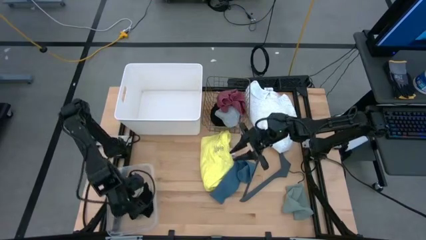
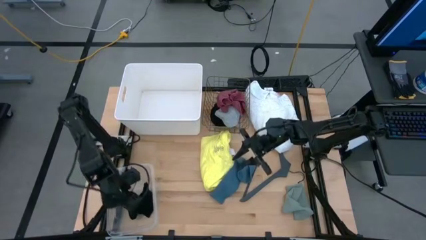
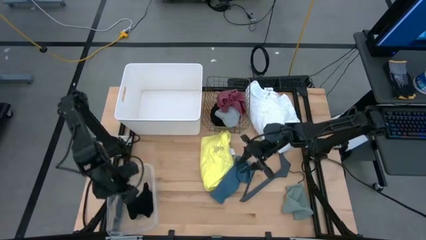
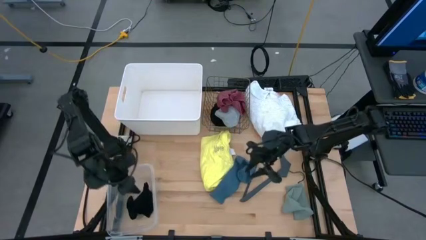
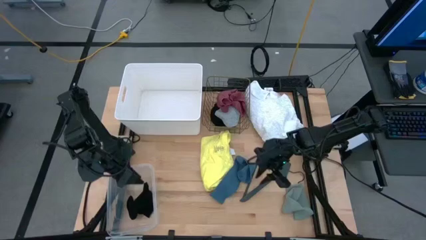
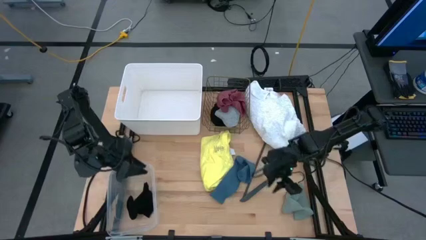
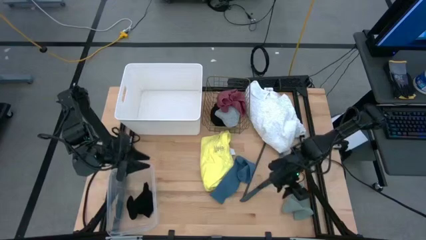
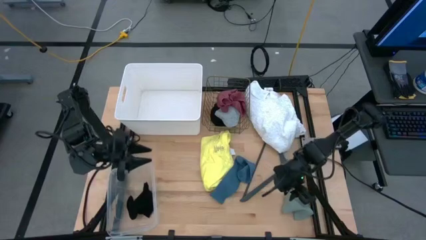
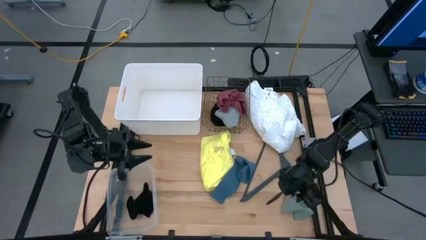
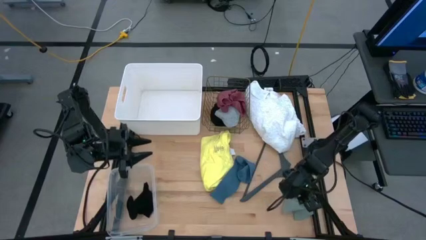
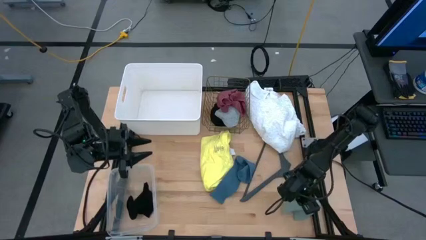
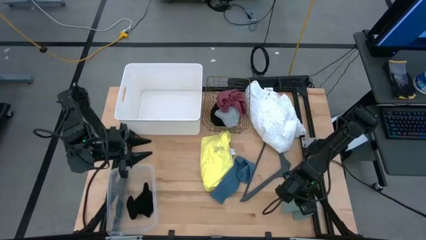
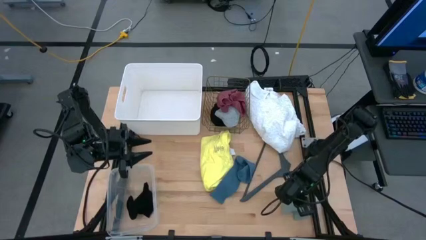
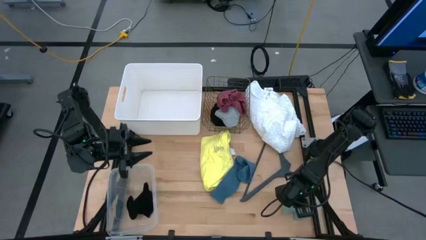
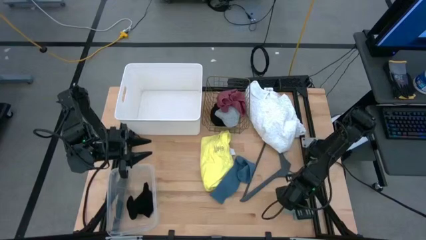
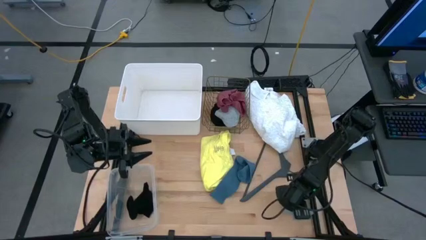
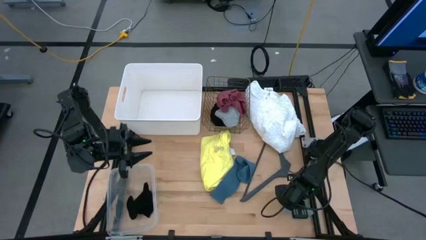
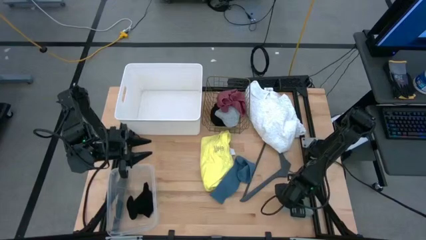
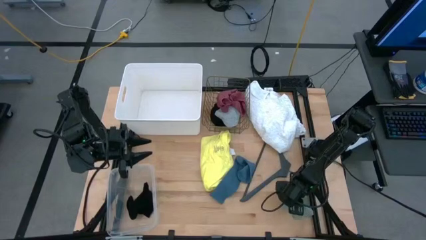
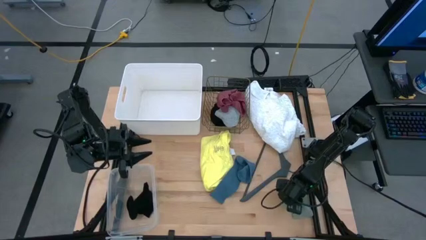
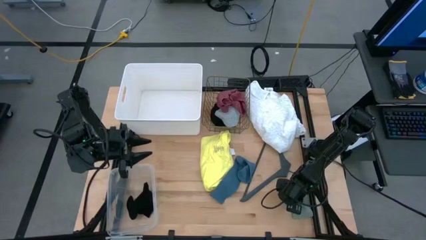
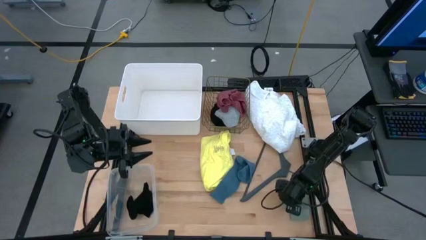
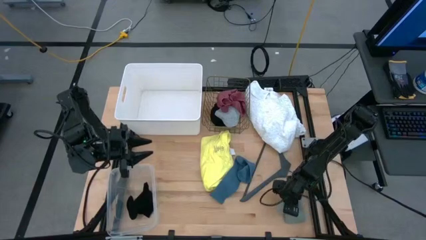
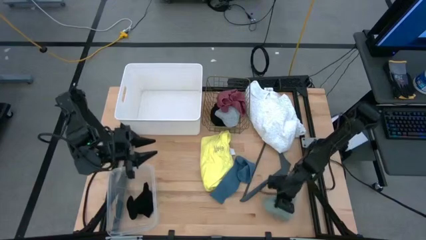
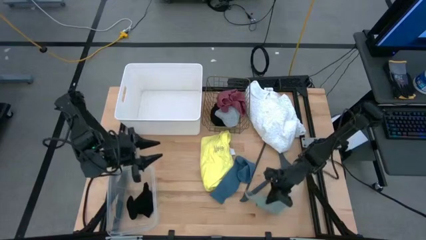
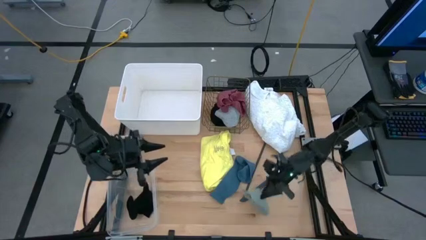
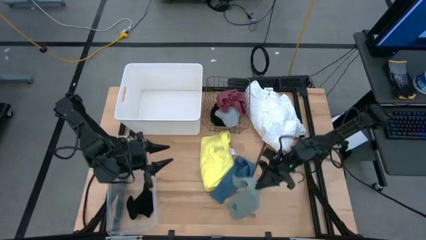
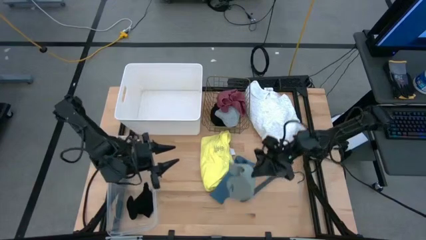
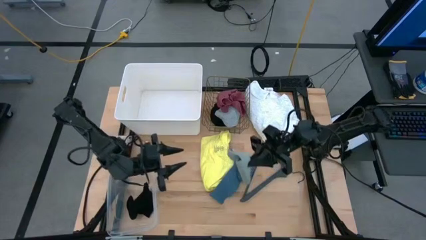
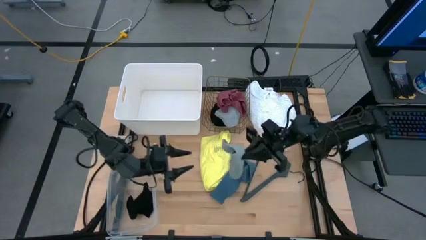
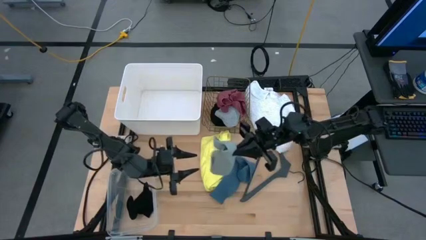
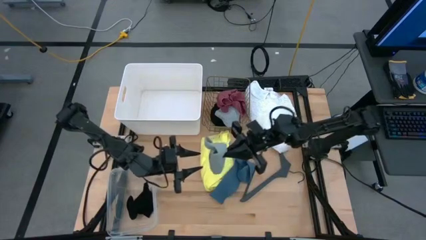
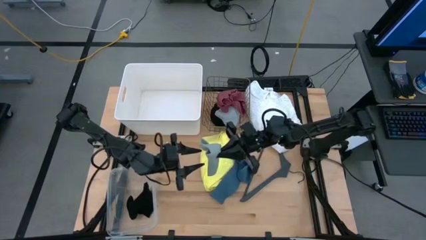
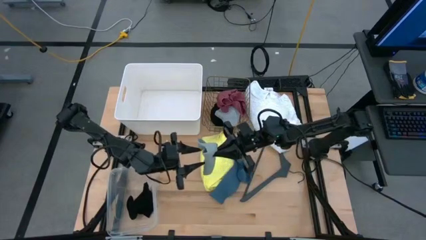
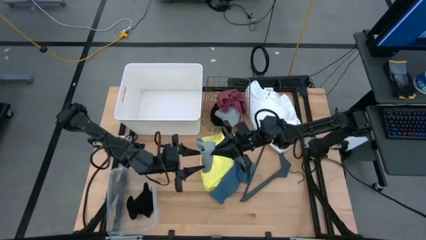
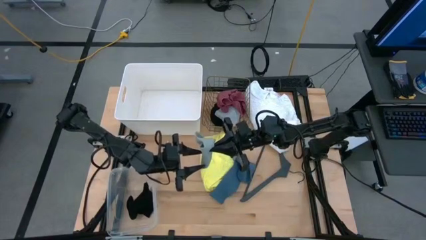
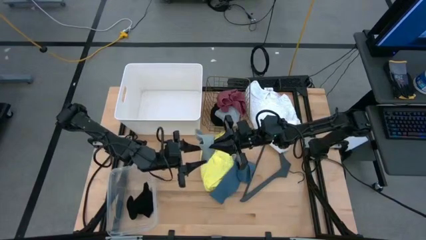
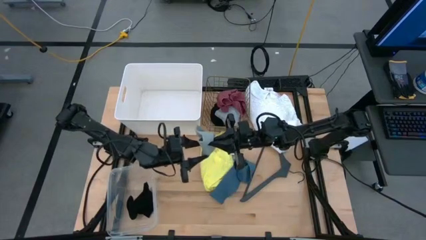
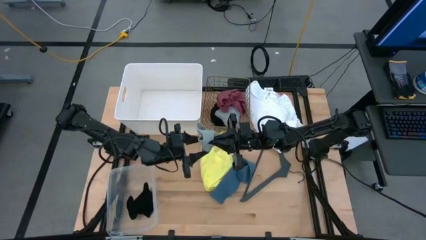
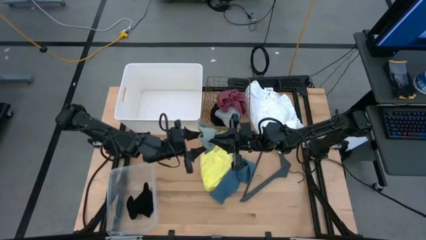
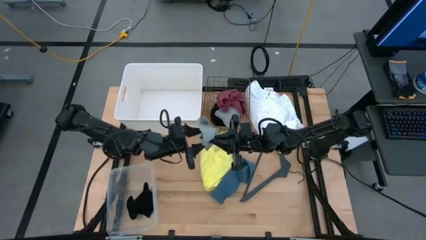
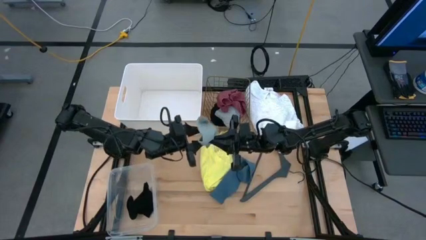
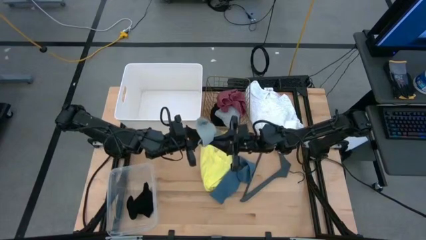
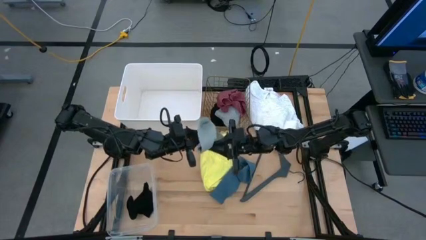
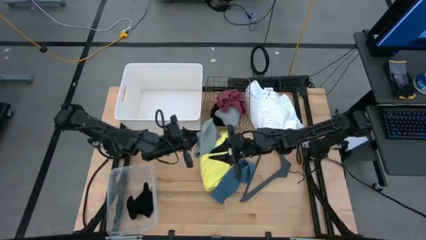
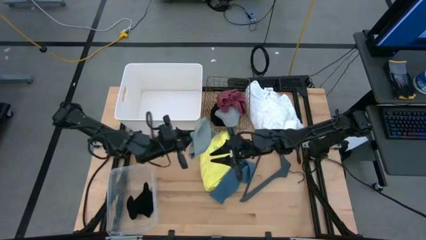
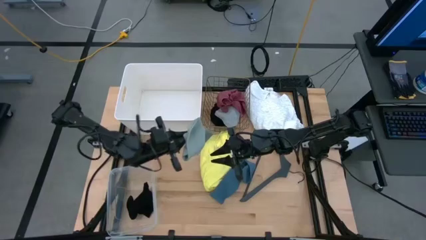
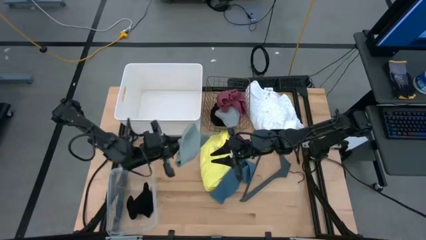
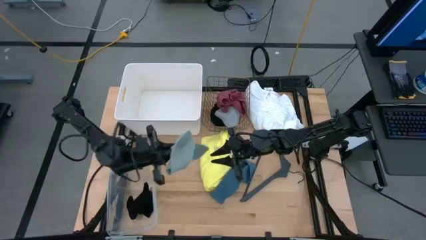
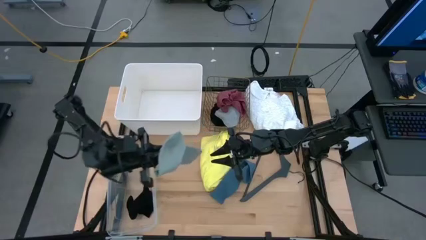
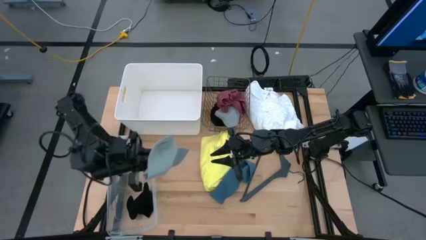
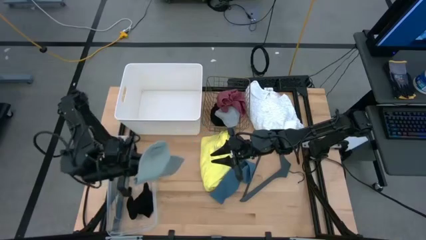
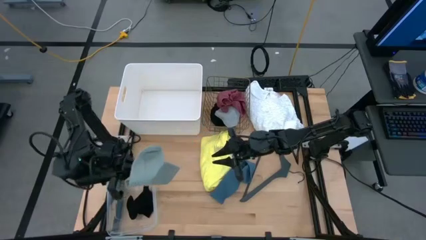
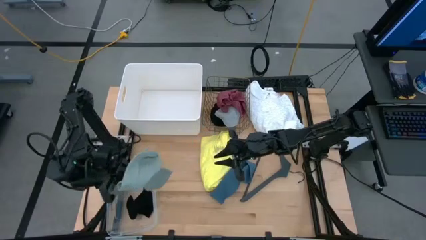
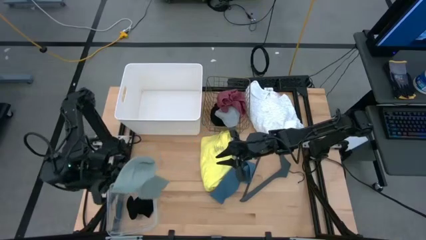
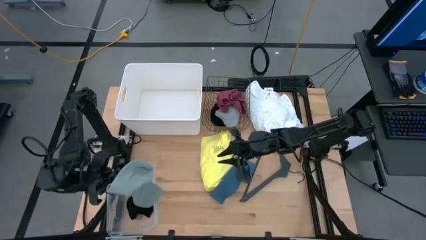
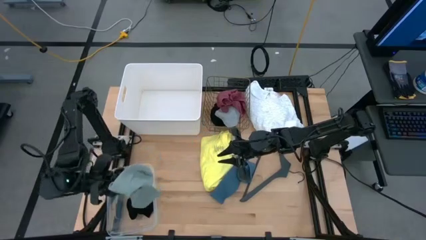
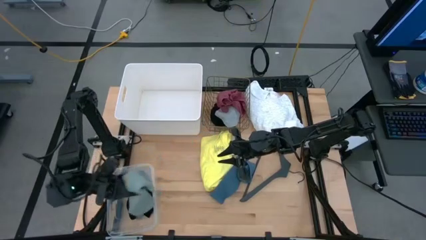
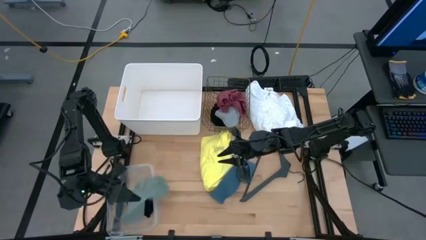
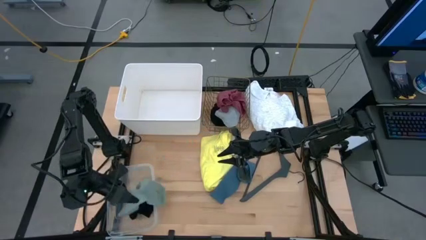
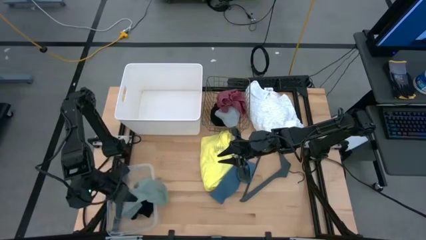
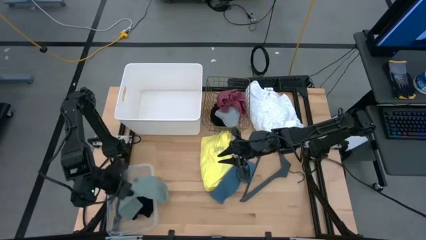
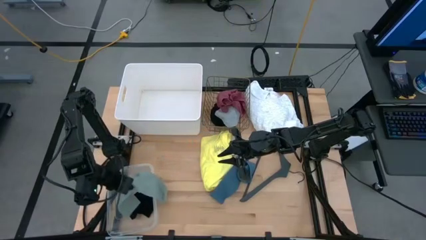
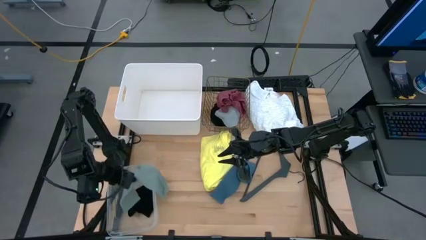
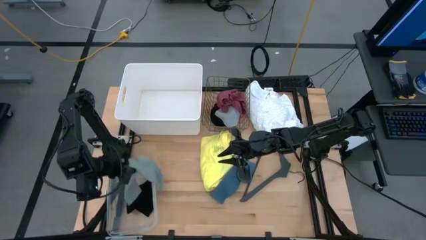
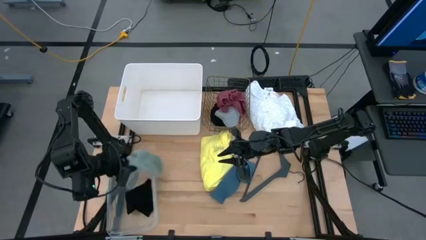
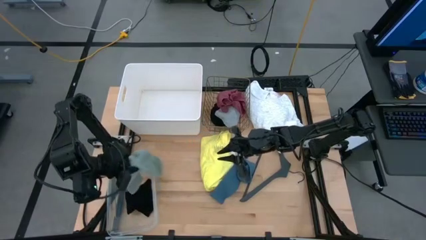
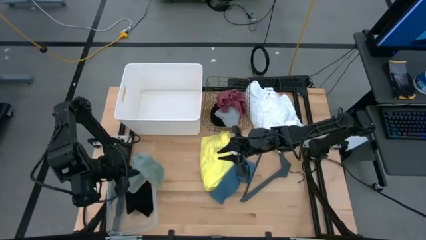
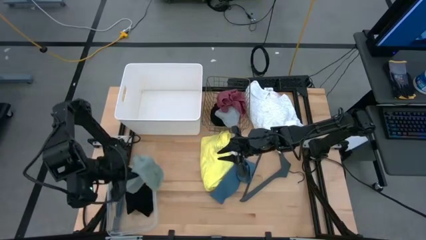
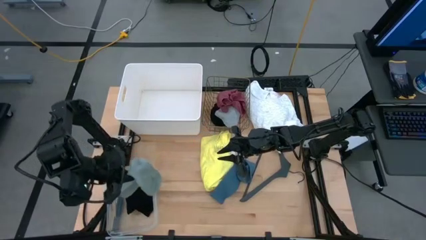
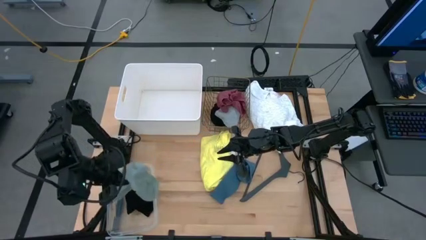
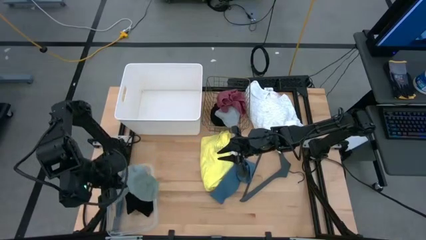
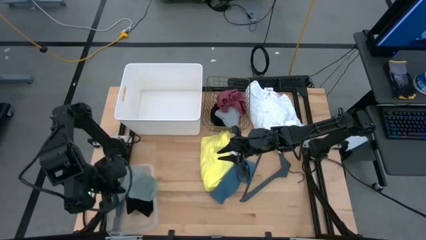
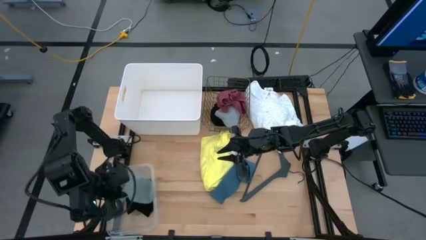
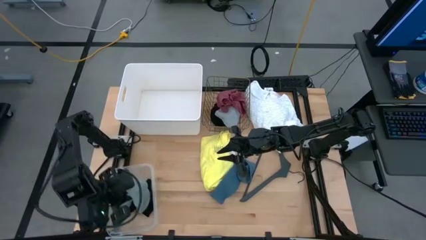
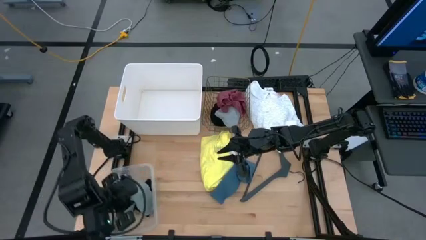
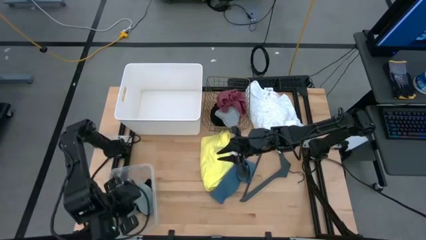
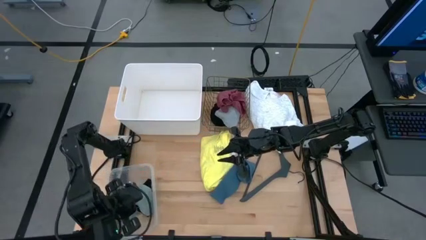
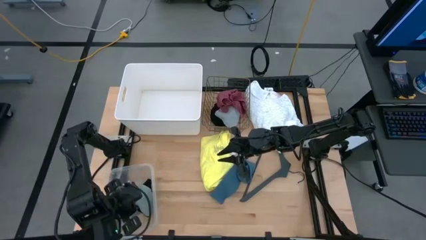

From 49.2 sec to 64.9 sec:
Task: Pick & Place Cloths
Put the gray sock into the transparent bin

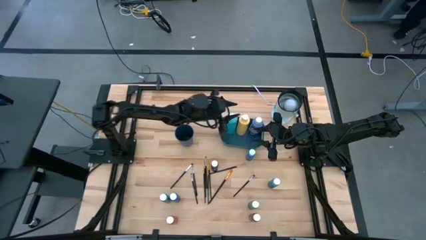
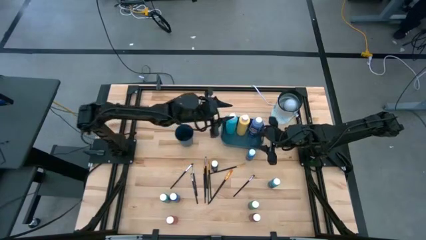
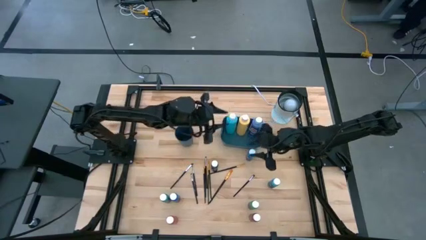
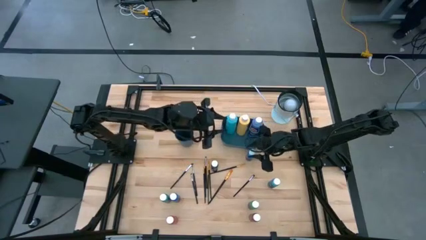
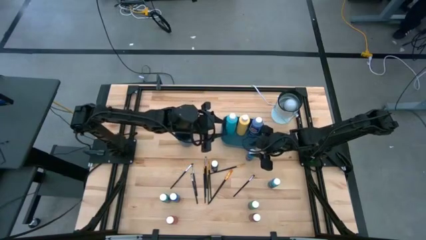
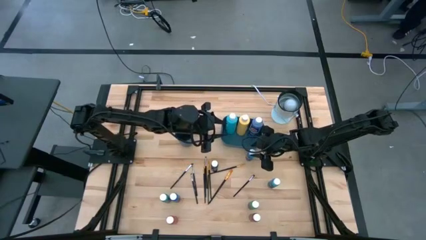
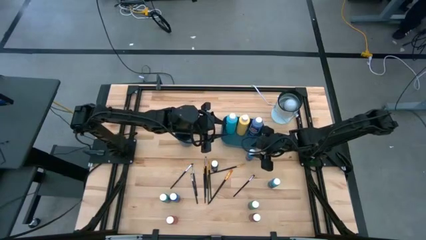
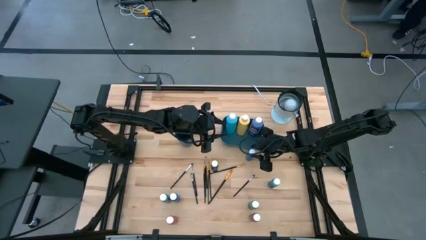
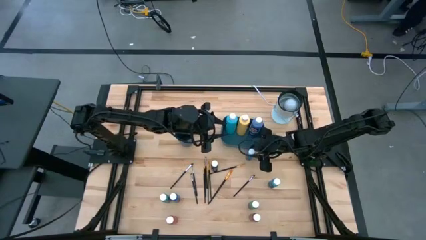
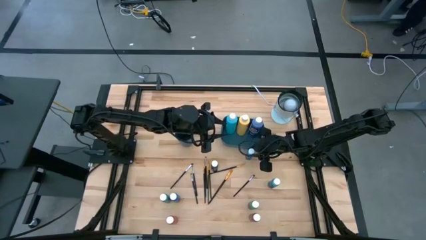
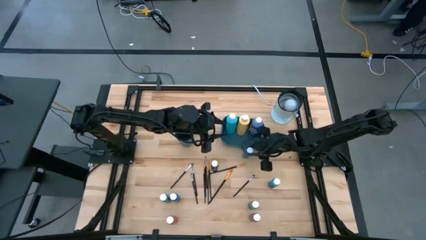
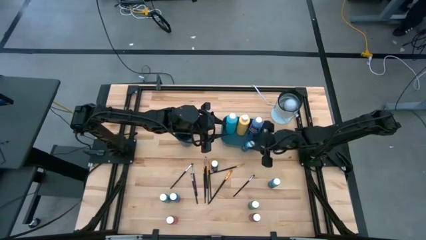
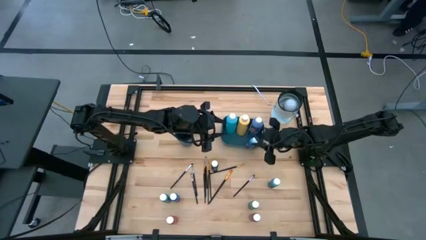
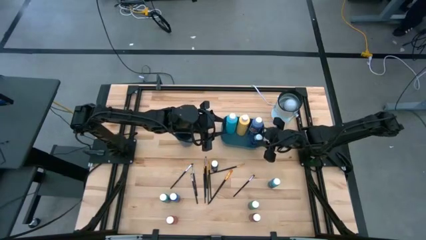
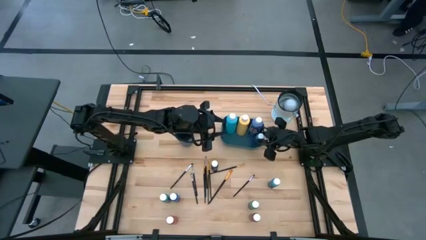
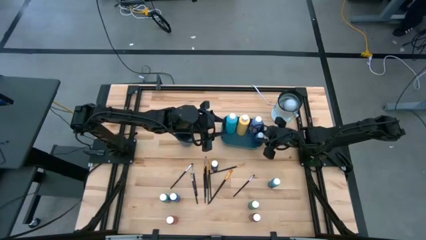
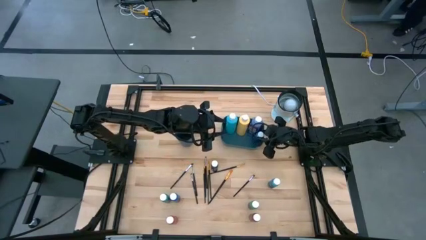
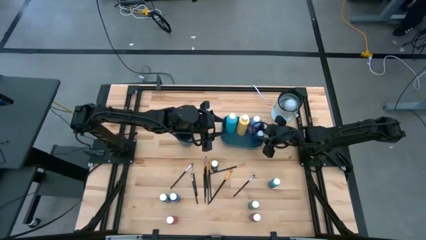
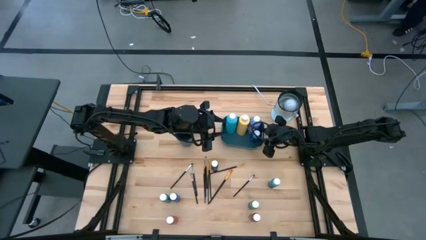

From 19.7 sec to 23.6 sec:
Task: Pick & Place Paint Supplies
Put the small blue paint bottle into the blue bin
